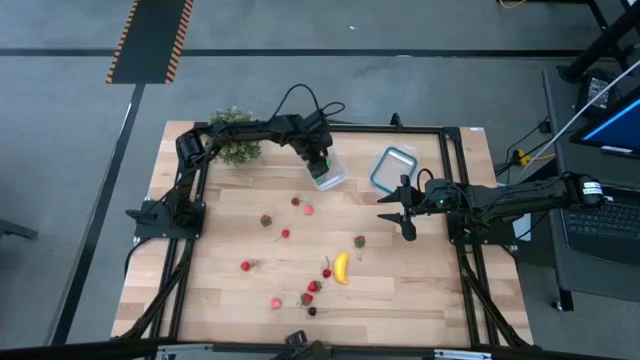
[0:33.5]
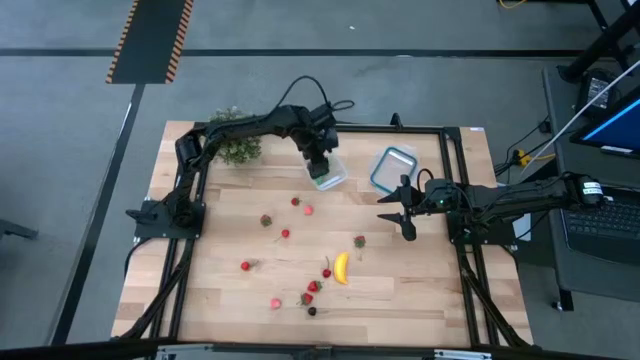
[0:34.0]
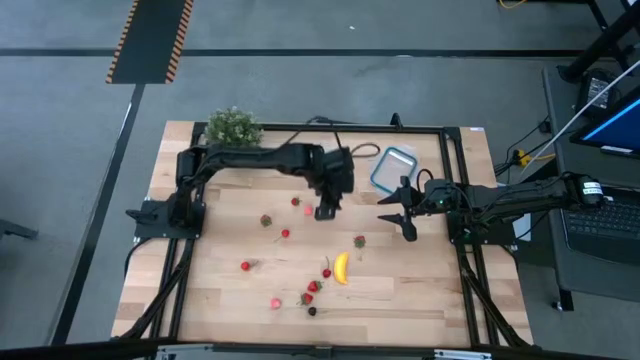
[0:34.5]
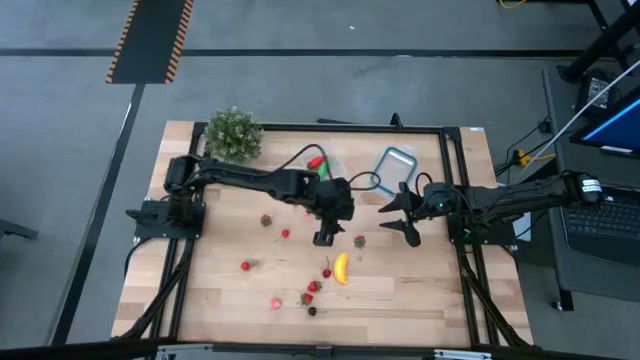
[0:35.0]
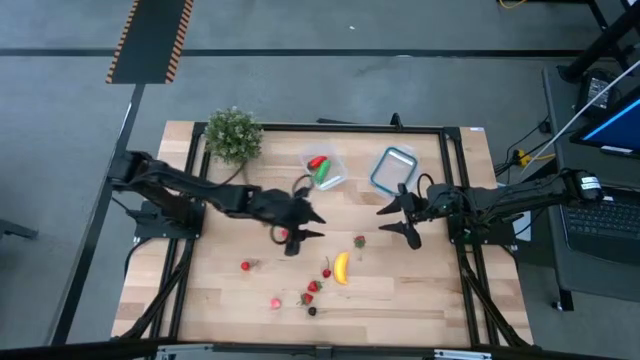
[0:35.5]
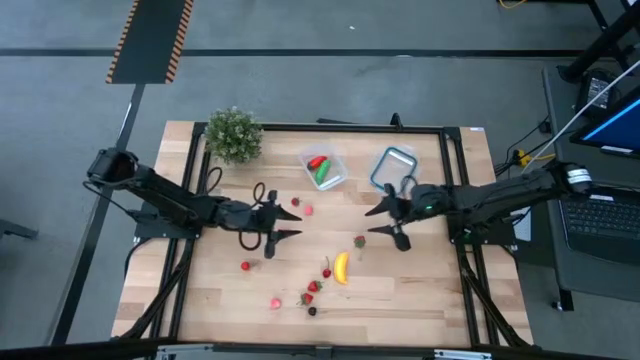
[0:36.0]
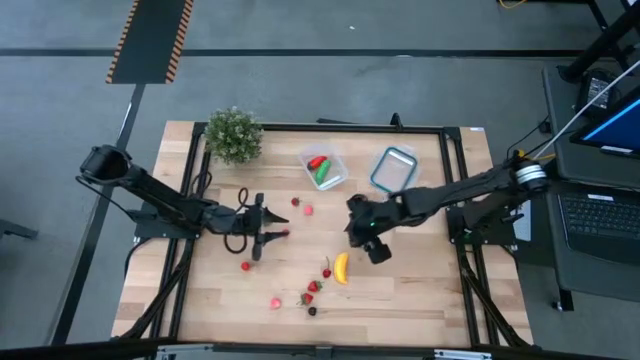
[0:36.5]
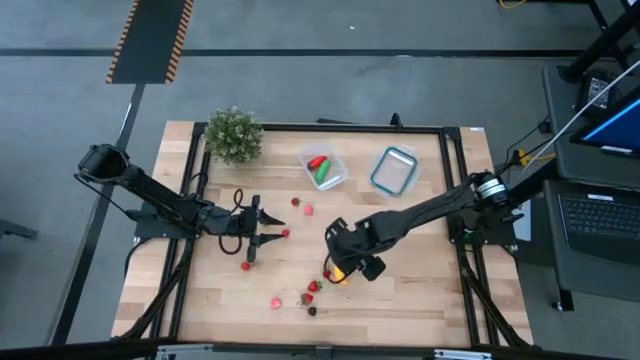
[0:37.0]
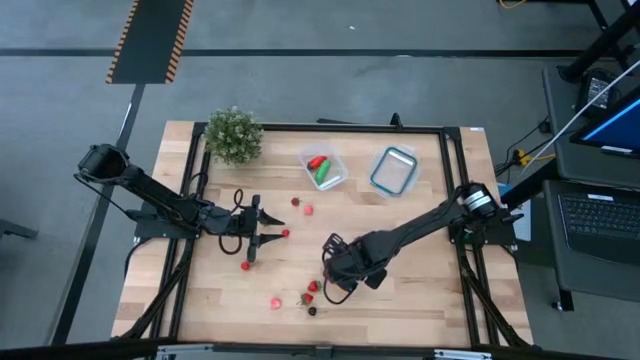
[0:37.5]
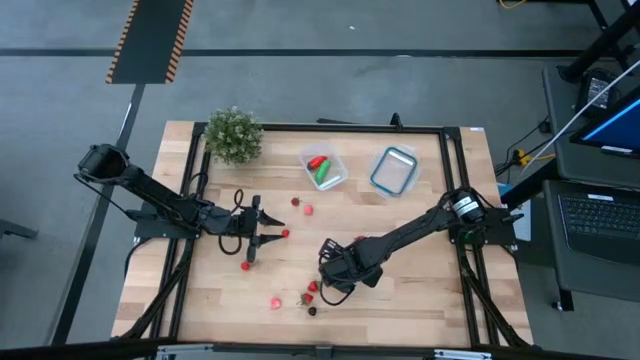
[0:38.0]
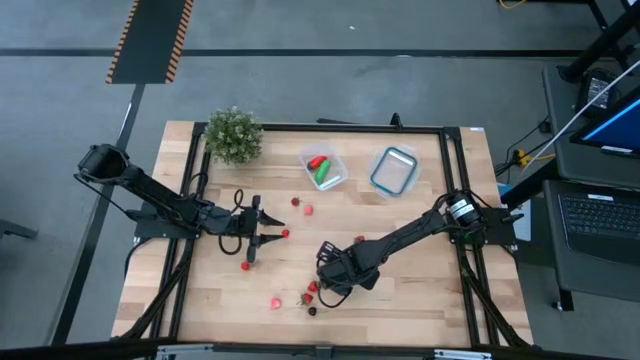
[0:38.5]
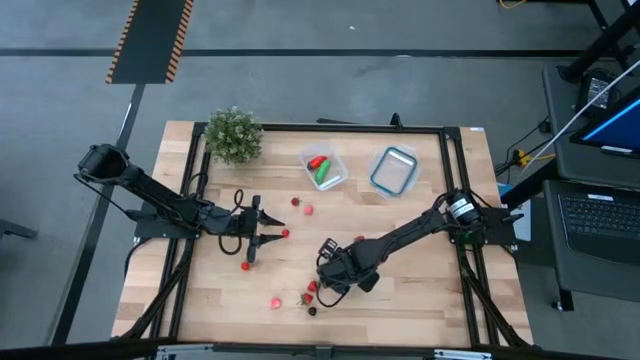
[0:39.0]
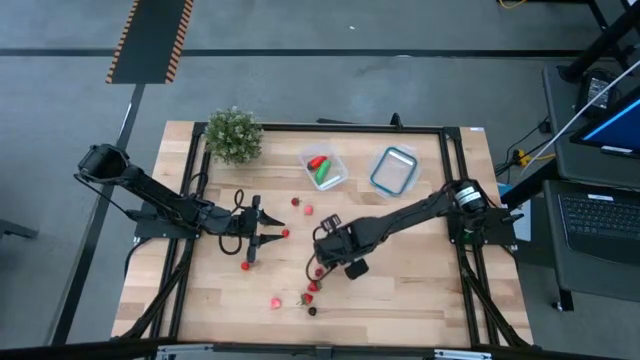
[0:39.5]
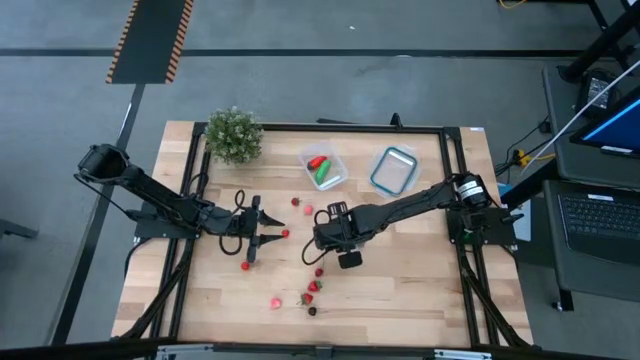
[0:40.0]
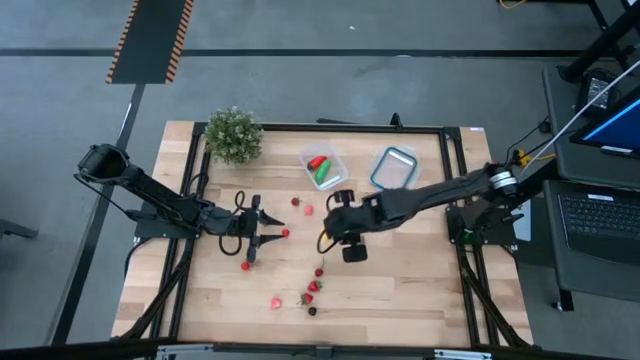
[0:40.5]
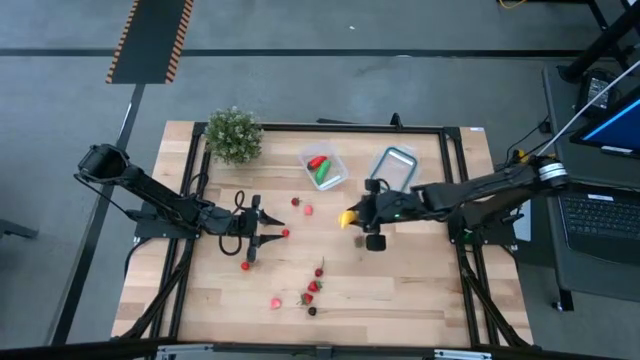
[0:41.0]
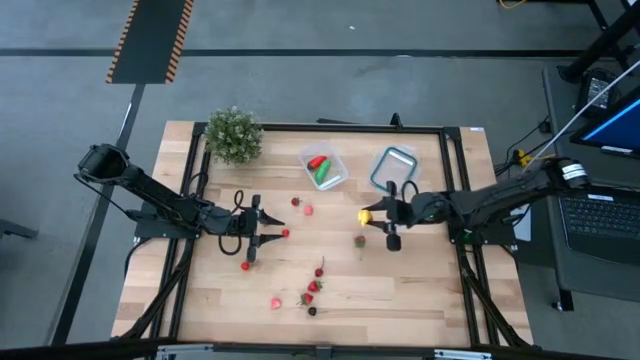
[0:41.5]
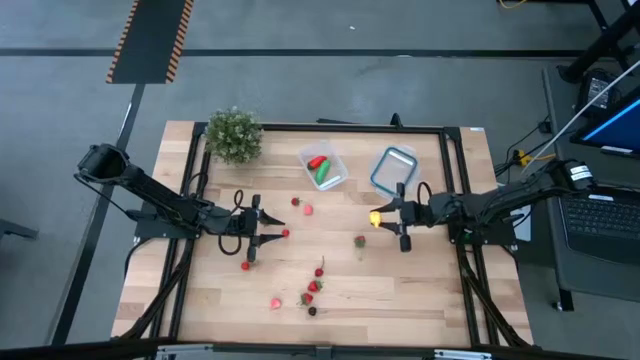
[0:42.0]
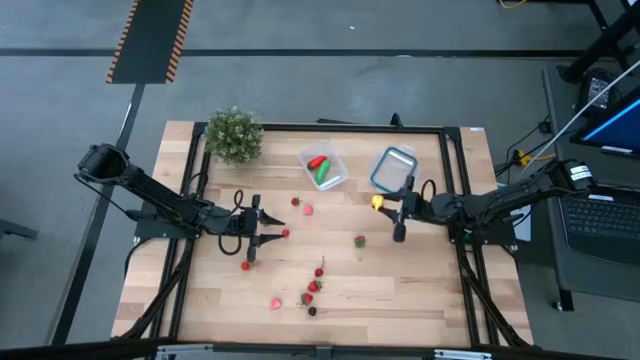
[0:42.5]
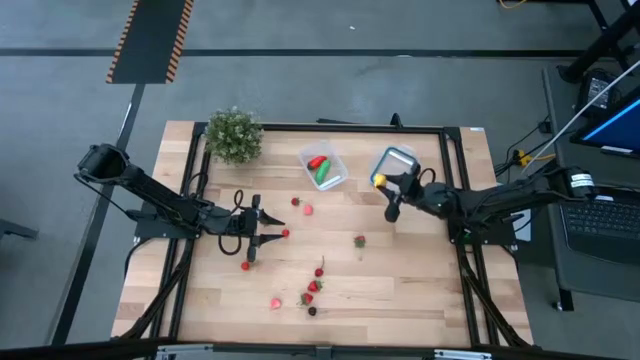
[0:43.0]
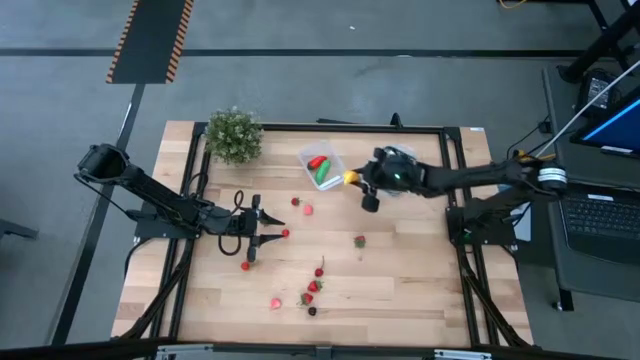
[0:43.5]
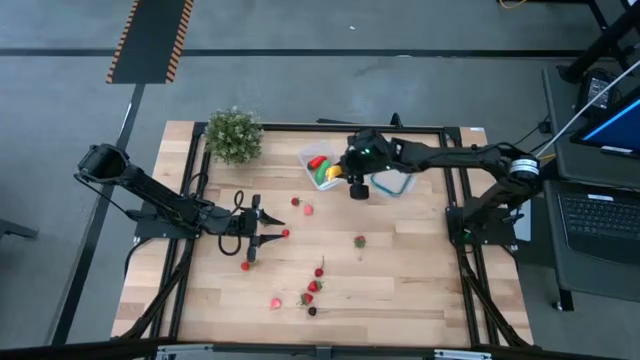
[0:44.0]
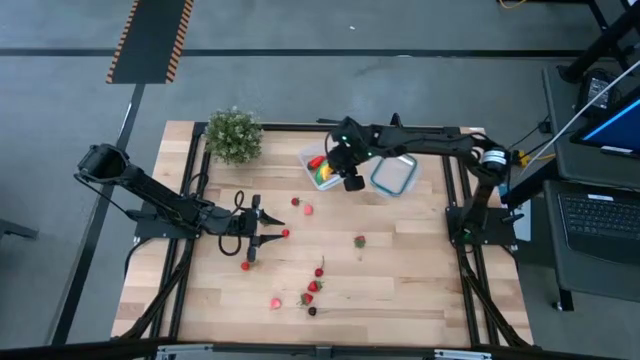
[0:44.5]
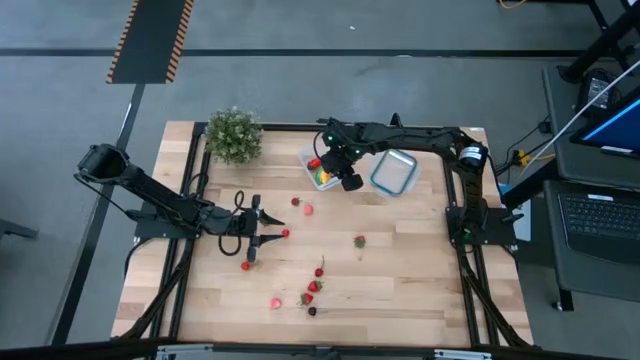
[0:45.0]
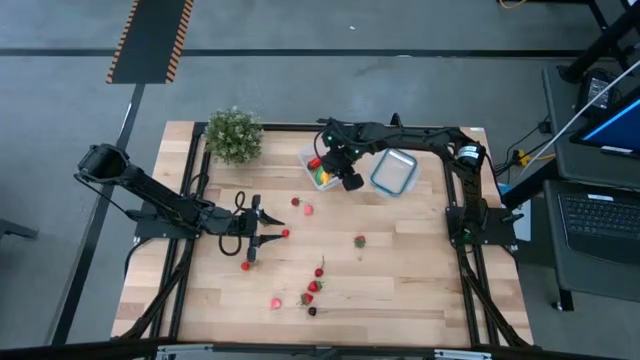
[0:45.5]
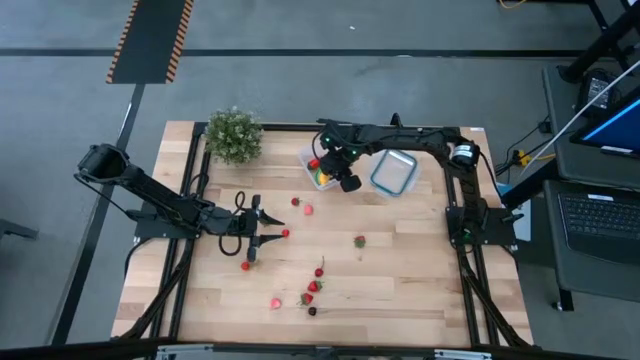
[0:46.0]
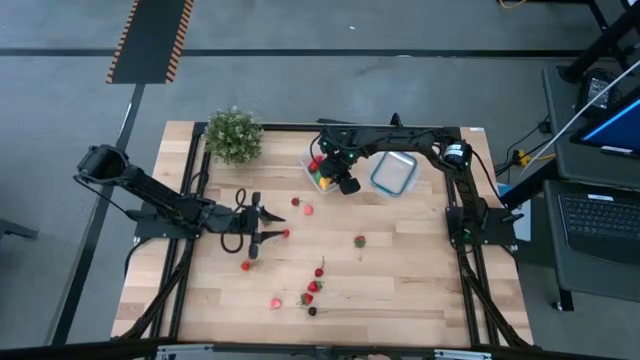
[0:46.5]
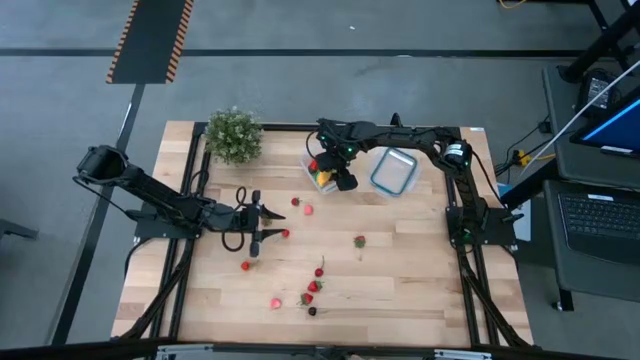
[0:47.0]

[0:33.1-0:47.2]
Task: Pick and placing Produce into tupperware
Put the yellow banana into the transparent container

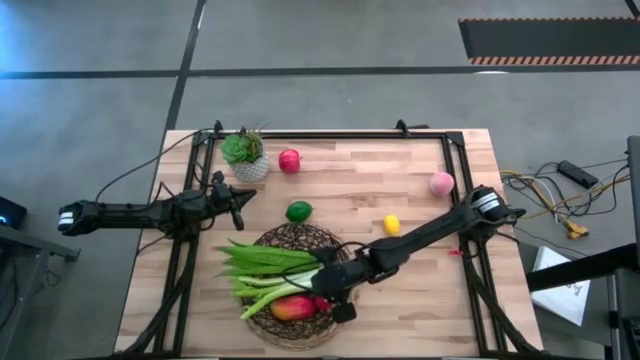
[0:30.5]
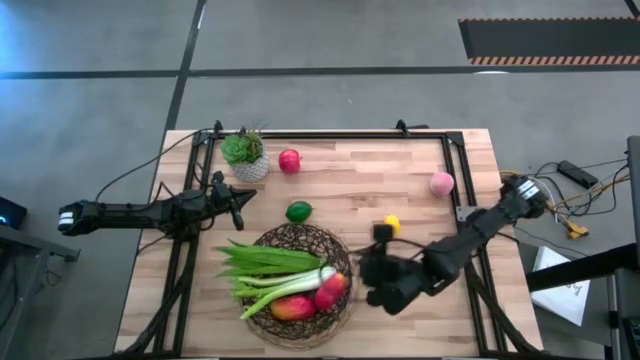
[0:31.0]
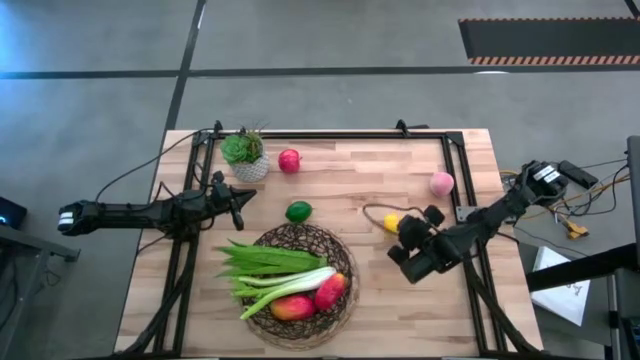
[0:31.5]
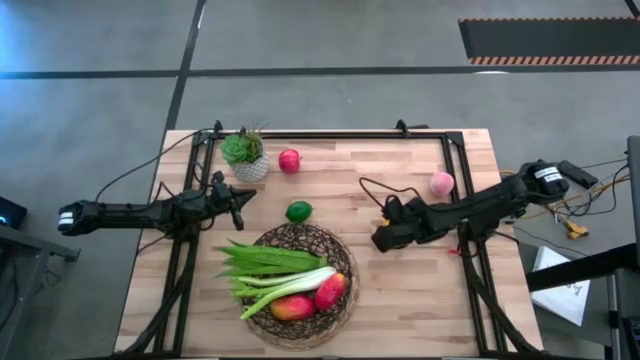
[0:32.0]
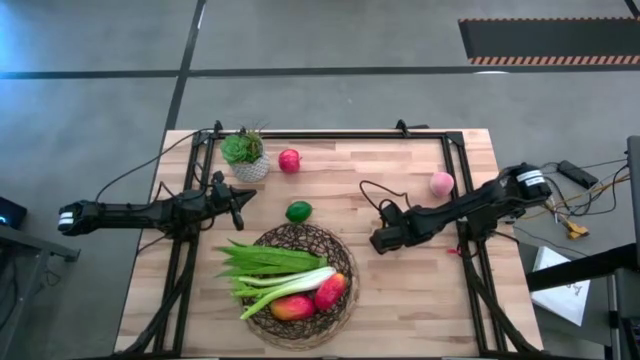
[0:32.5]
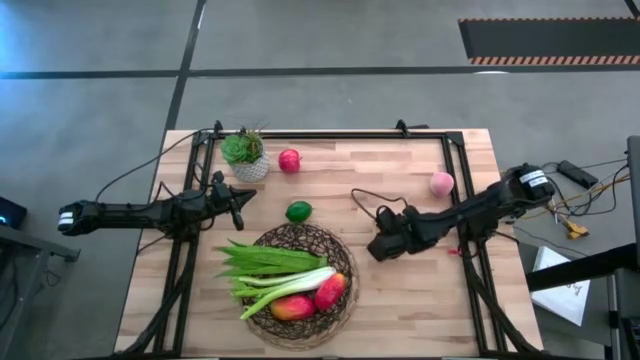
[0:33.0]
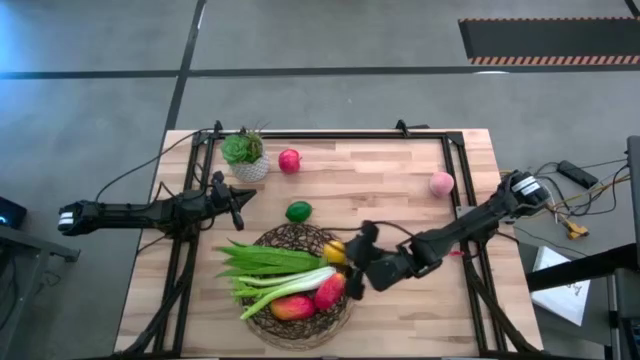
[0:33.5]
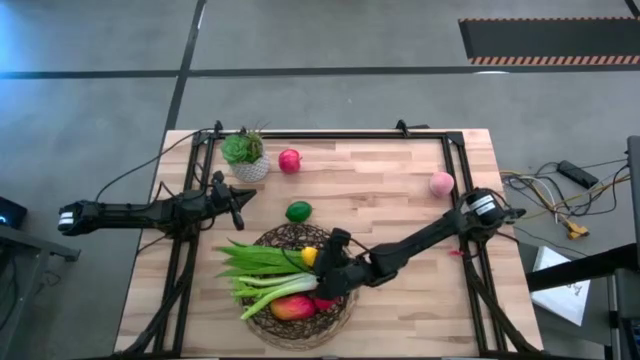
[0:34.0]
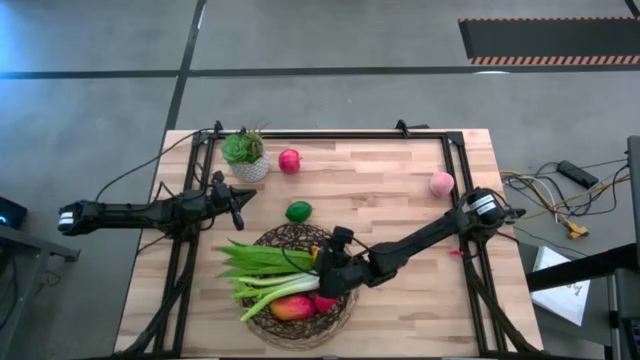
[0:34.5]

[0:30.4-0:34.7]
Task: Build produce basket
Put the lemon into the mesh basket
